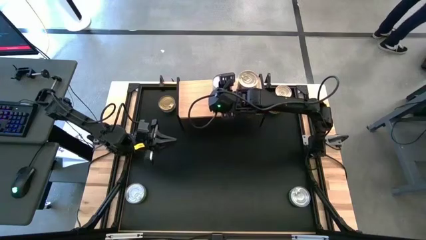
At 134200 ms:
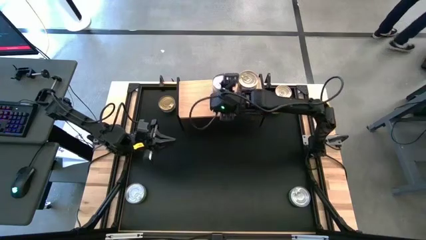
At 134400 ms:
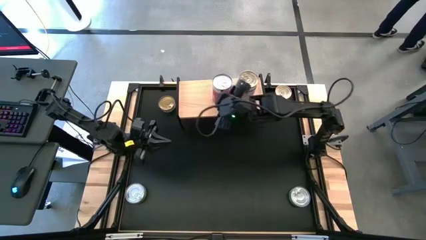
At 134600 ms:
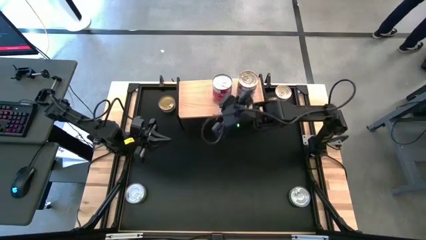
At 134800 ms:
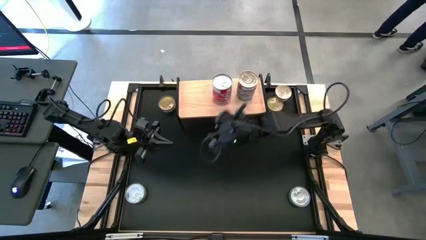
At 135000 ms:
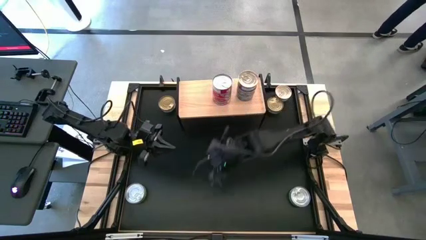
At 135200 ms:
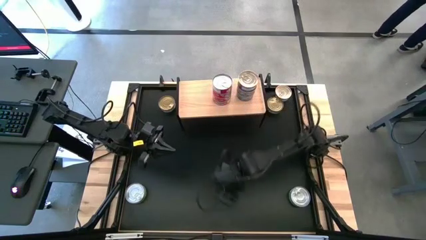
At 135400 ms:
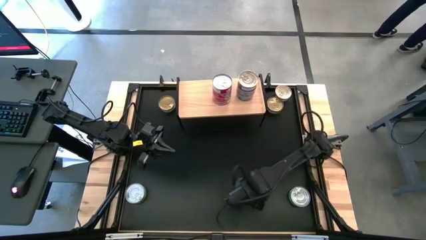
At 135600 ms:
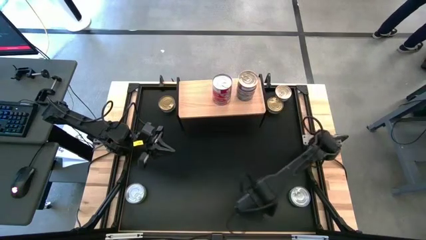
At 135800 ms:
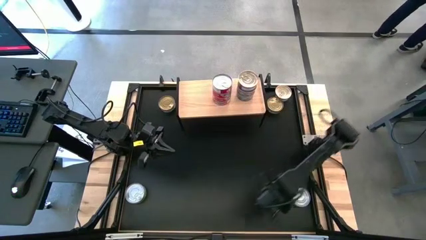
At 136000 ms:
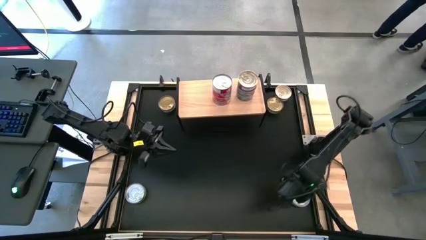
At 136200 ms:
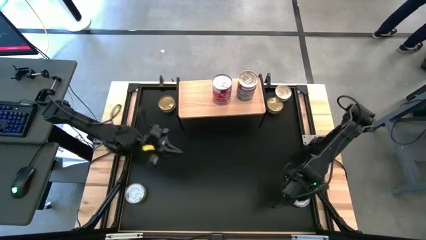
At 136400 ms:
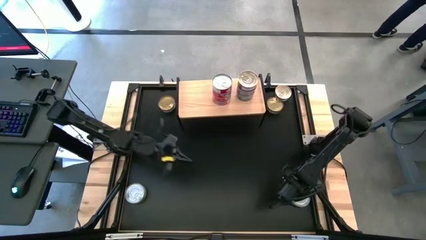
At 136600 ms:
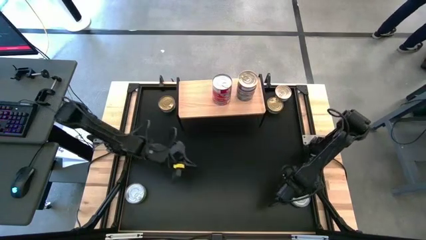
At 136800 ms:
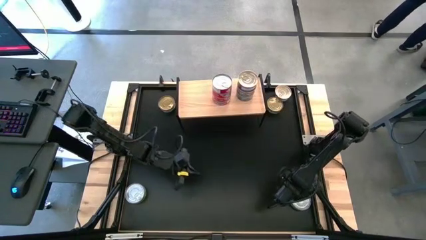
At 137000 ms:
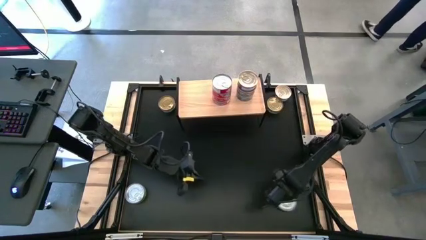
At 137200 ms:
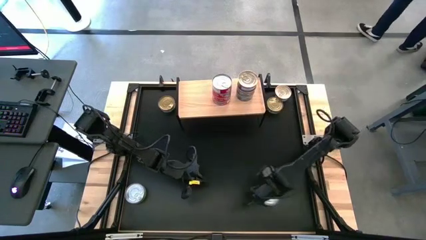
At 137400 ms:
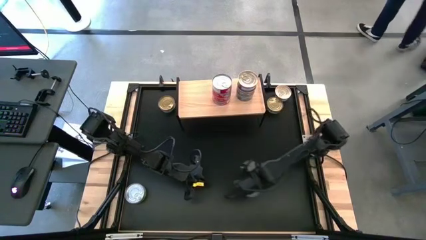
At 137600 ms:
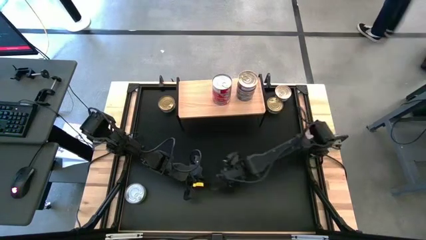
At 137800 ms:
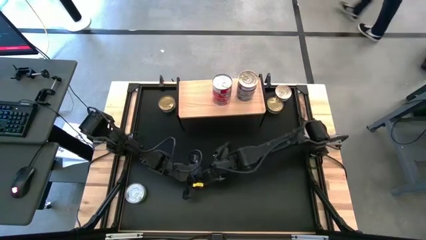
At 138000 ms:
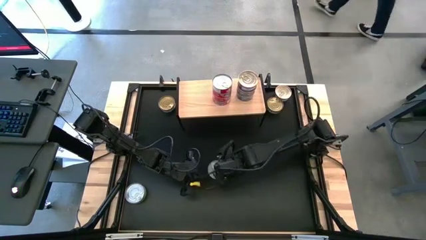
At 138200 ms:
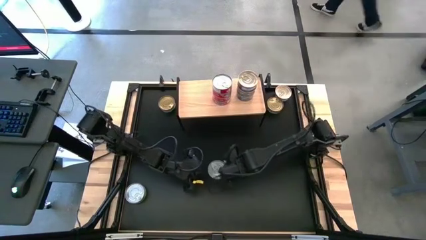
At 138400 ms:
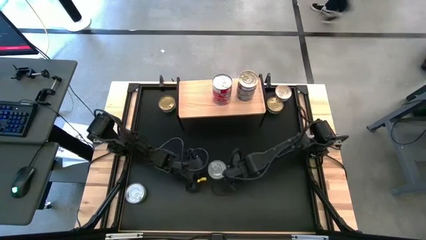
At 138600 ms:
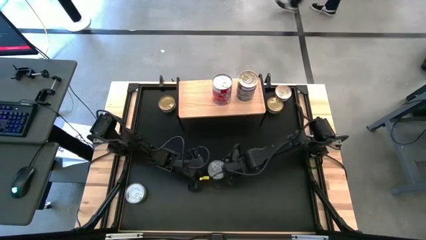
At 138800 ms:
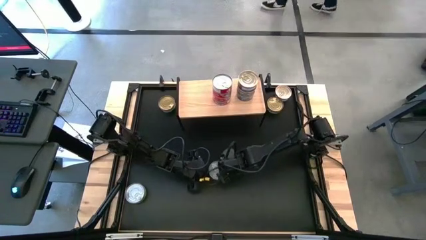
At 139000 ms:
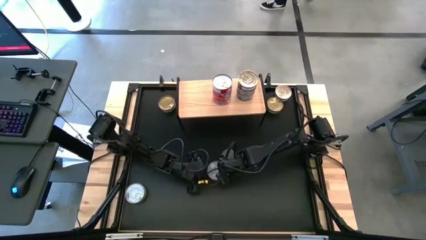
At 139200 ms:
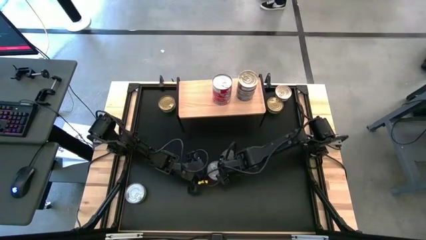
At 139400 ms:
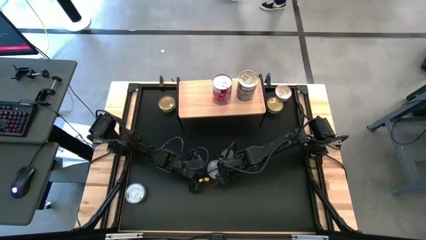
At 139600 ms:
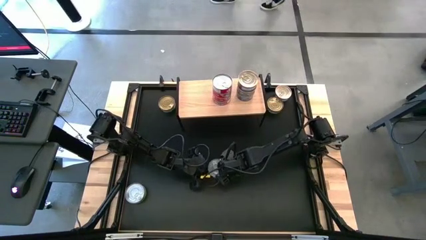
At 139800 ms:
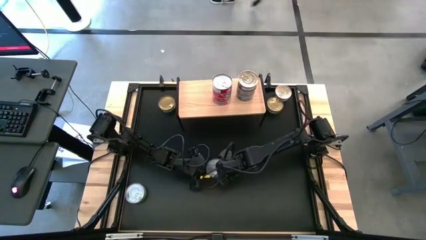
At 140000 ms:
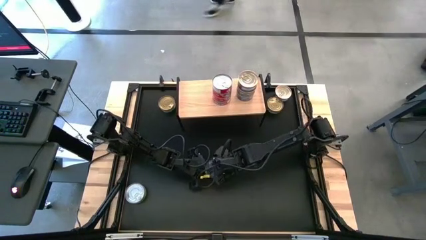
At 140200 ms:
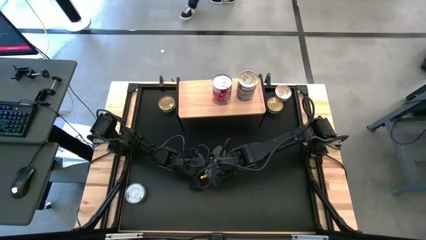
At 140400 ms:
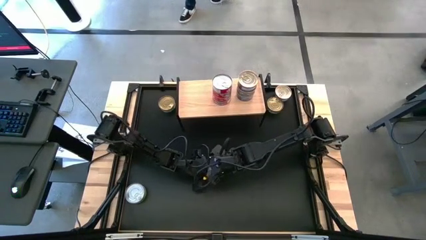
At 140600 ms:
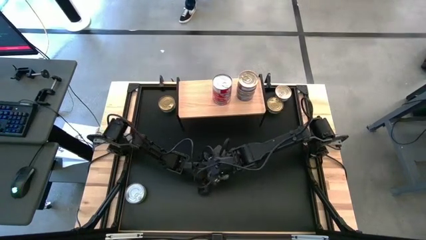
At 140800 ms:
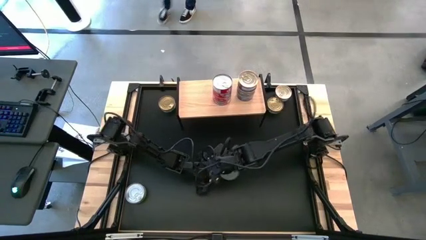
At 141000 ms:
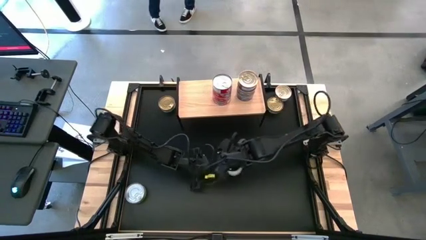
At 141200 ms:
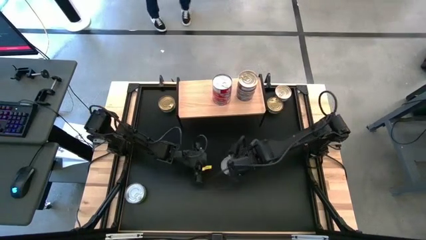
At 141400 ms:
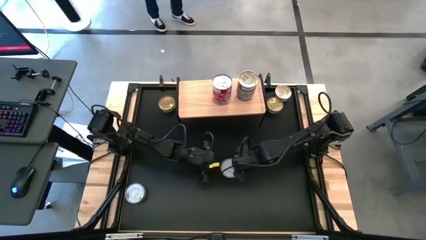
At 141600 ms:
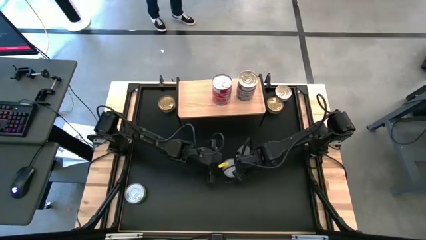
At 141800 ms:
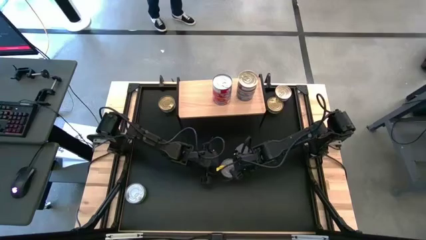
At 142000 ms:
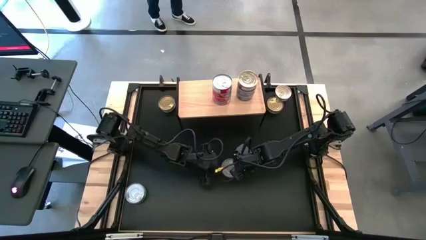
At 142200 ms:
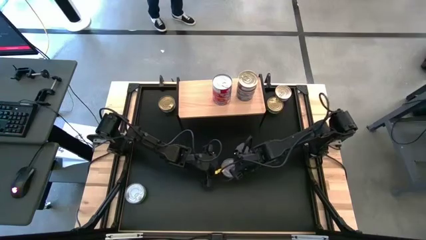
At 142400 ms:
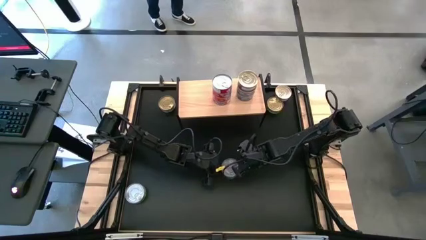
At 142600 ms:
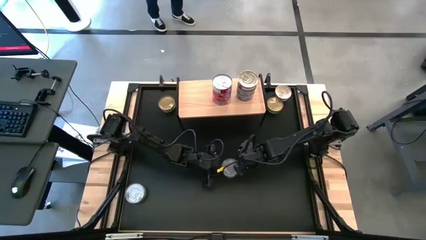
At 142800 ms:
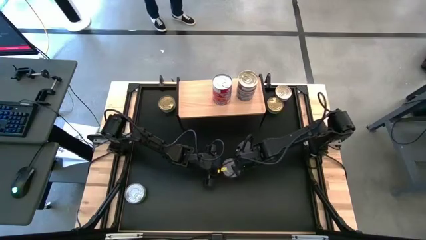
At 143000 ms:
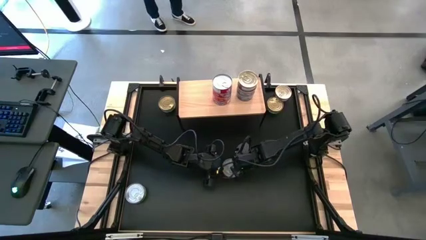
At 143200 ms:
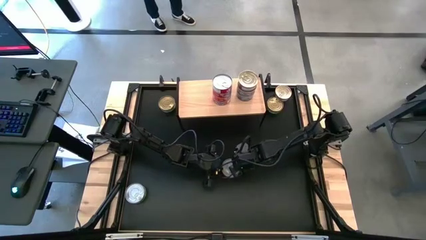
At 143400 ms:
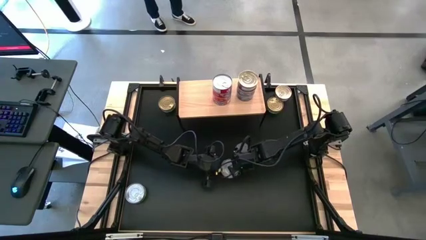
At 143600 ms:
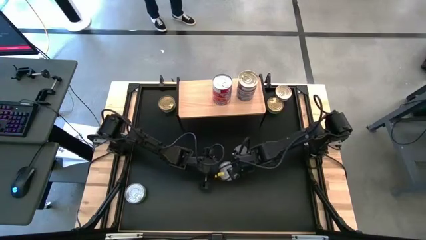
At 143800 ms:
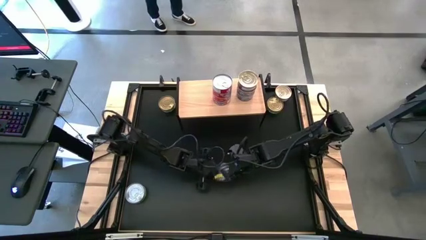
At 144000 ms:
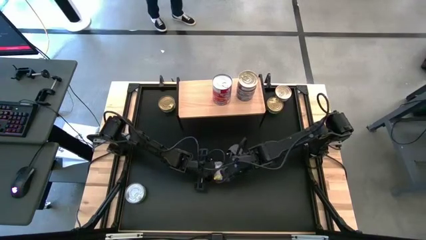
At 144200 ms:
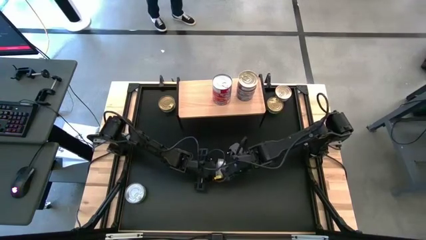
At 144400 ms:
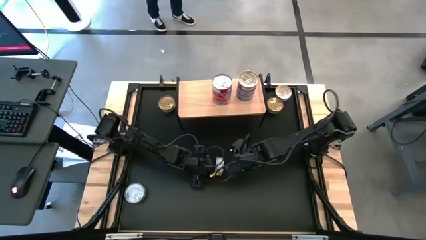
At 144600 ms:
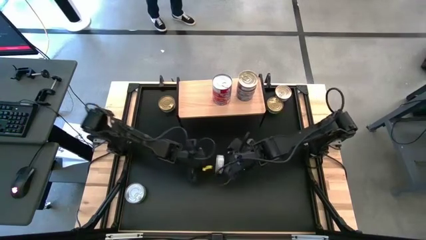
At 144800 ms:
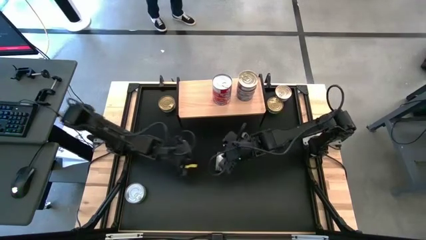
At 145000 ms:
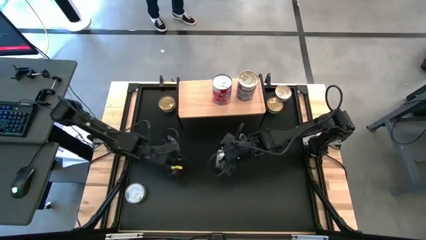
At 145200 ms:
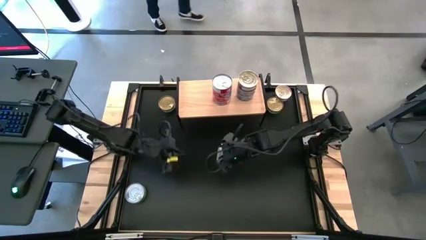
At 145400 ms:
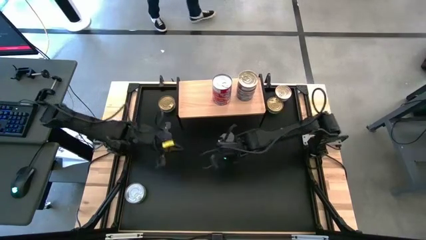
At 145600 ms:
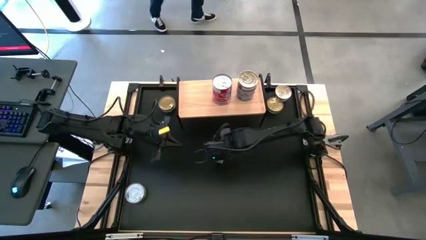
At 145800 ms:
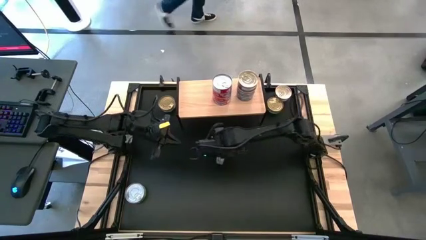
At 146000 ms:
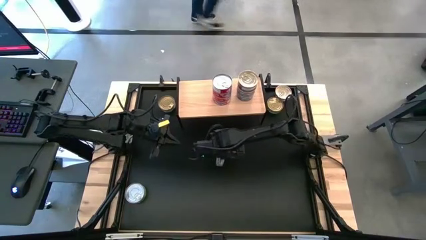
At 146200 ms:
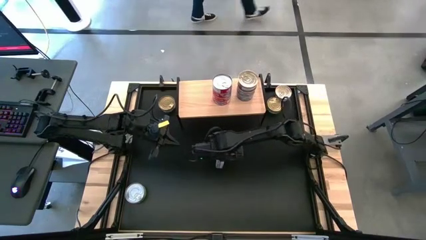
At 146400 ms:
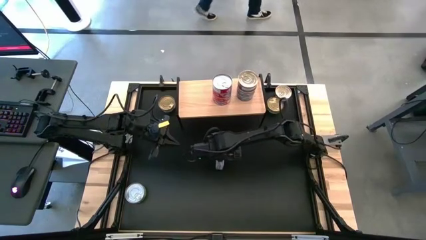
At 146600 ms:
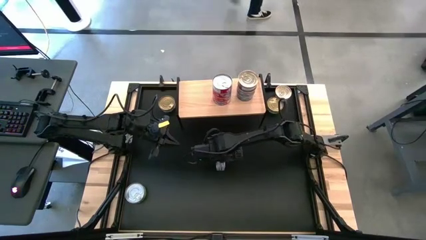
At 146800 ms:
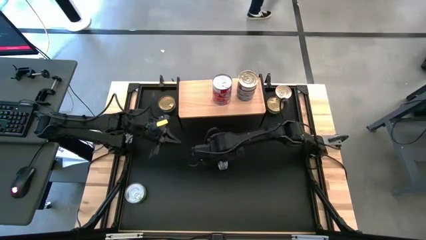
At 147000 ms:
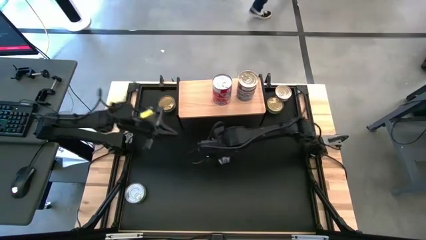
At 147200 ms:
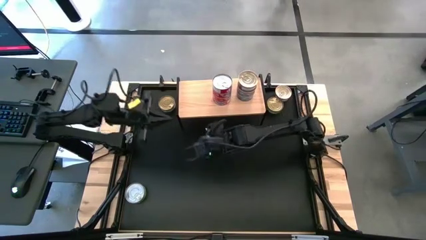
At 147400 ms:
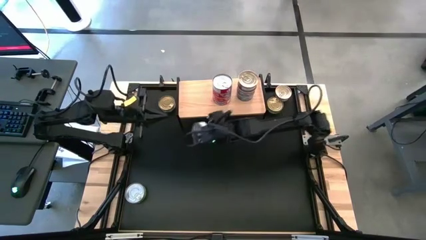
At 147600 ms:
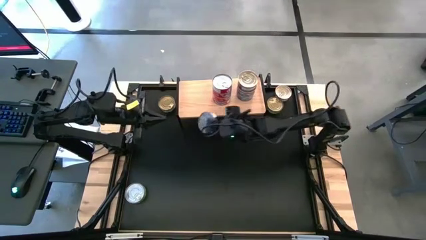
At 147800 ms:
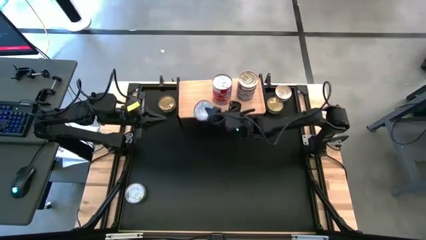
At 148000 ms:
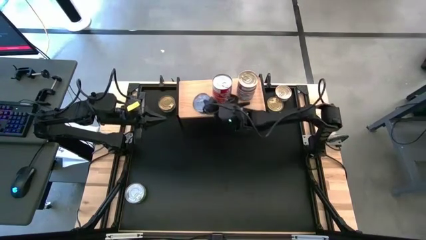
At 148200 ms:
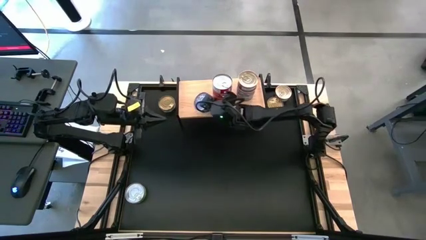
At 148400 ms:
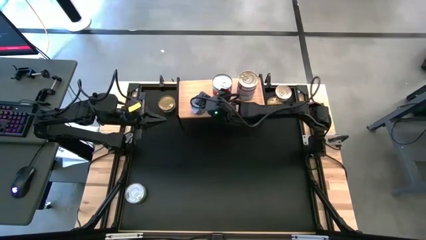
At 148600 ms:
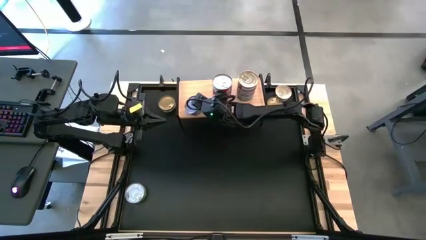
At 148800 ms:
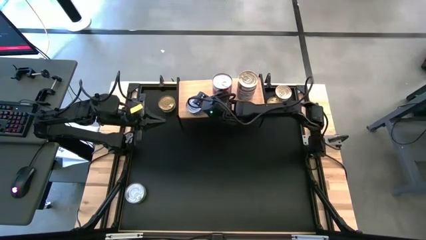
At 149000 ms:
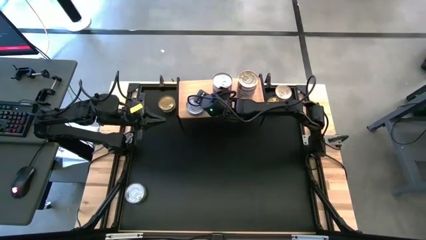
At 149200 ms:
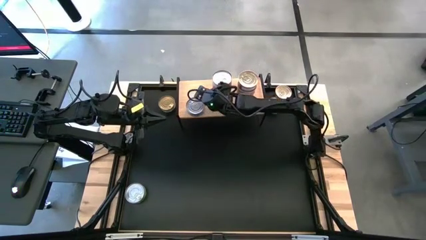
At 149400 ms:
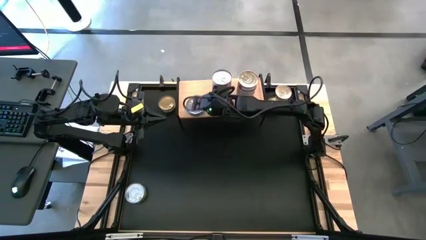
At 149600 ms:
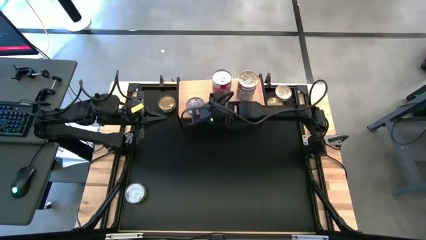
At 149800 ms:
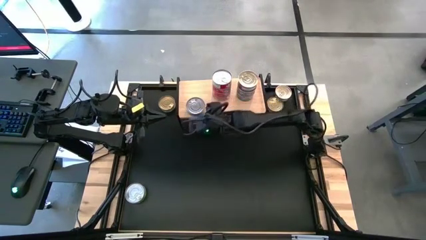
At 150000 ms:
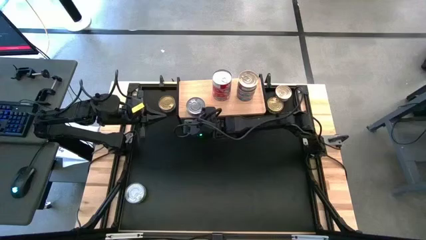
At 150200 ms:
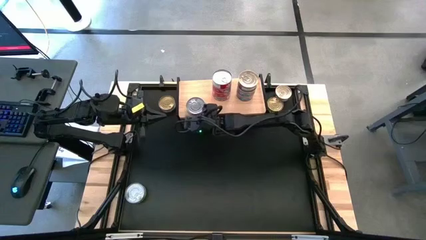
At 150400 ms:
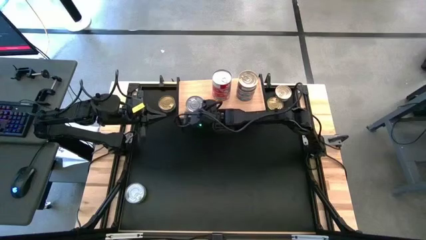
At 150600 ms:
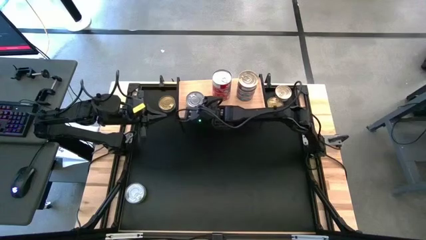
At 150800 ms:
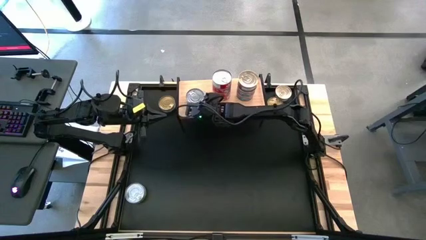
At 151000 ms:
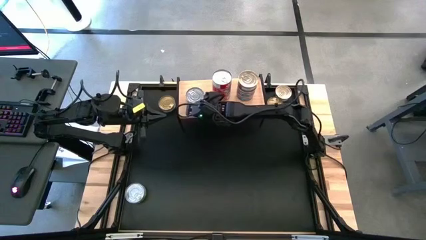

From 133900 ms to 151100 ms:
Task: Stack canned seafood by type on shelf
Put the green tuna can on the shelf
